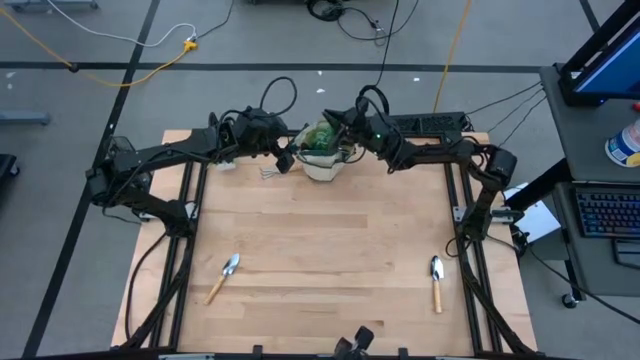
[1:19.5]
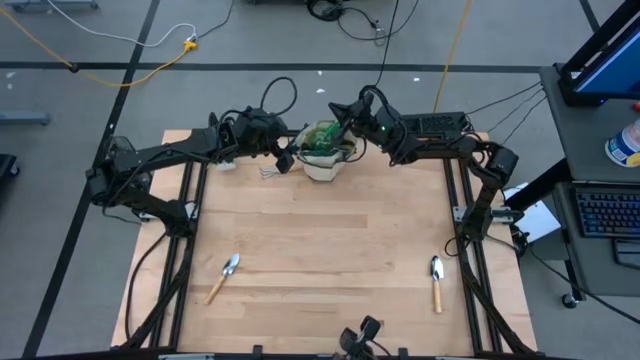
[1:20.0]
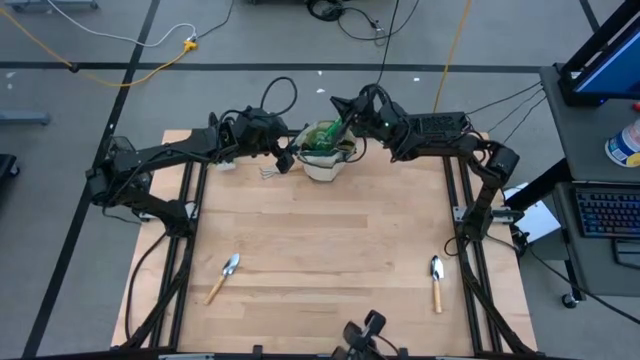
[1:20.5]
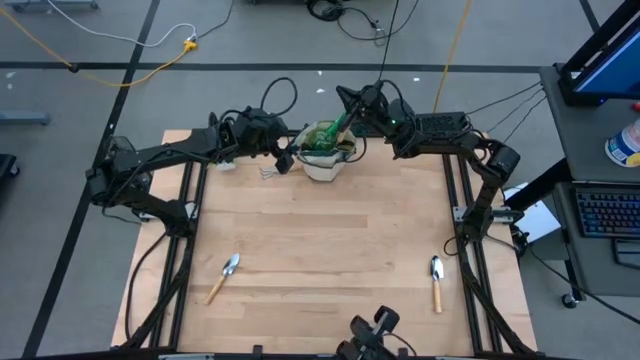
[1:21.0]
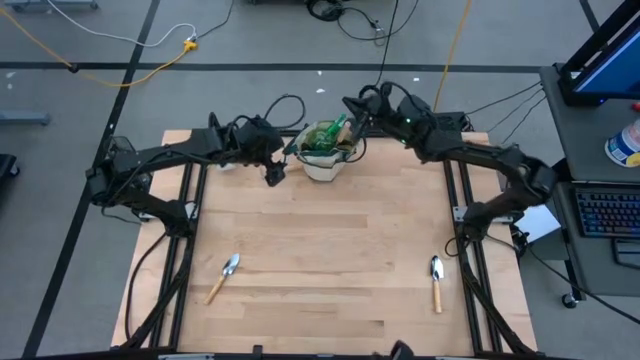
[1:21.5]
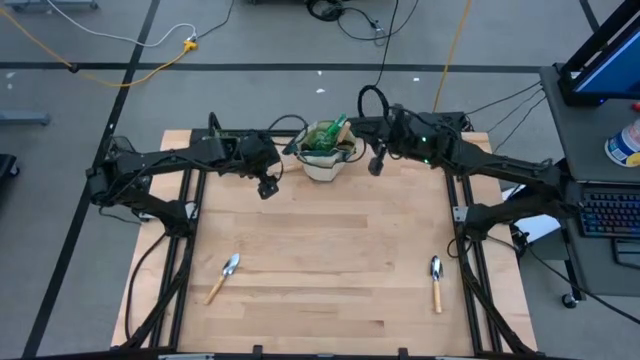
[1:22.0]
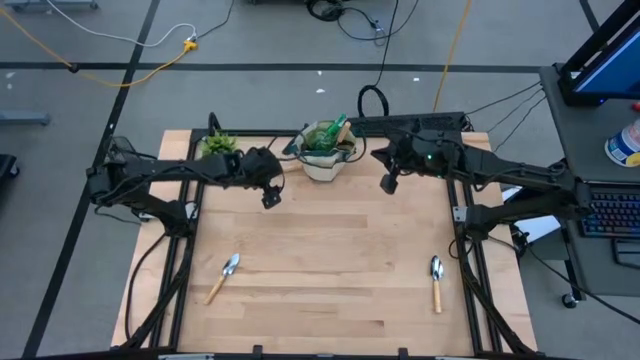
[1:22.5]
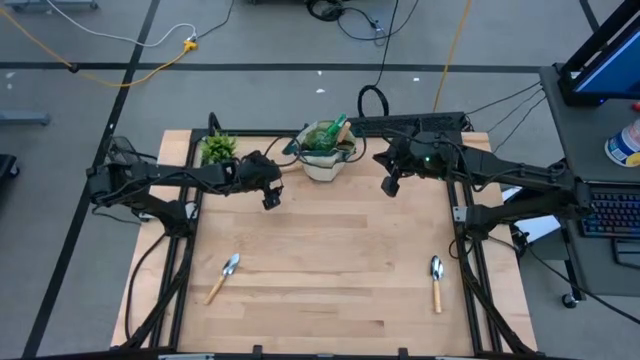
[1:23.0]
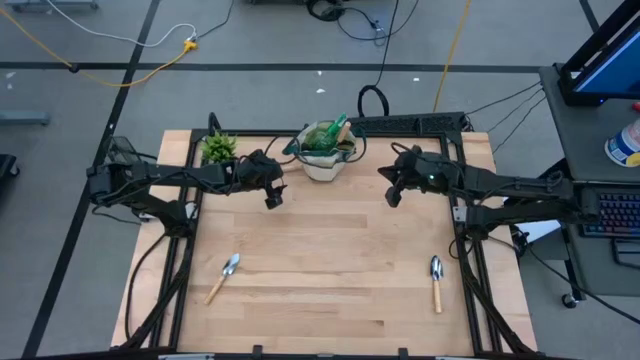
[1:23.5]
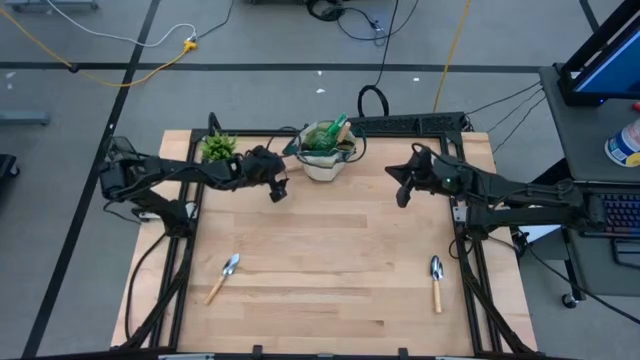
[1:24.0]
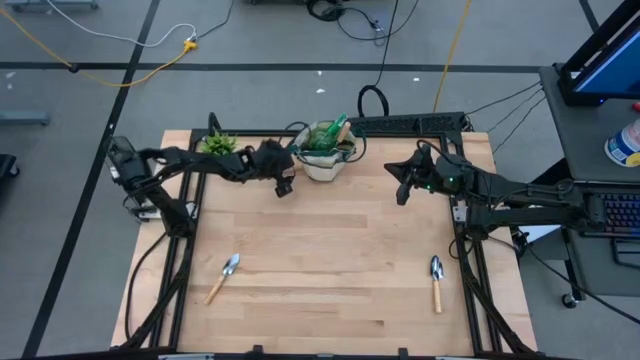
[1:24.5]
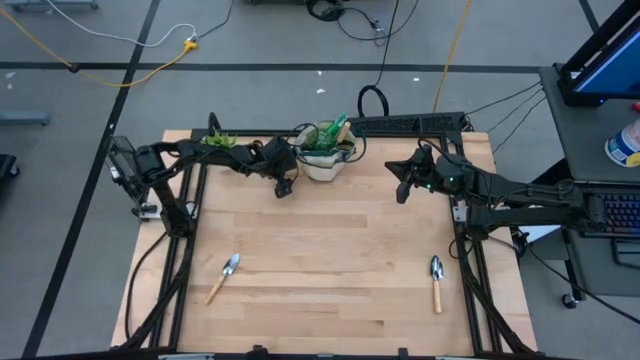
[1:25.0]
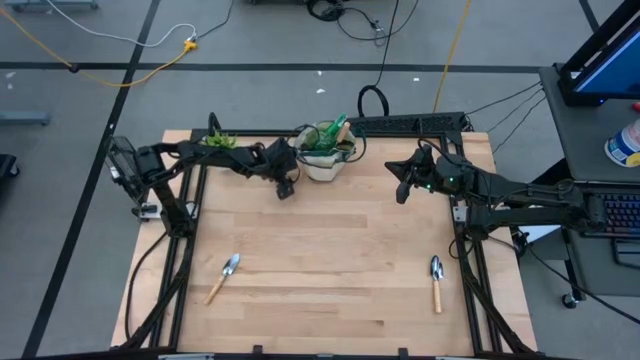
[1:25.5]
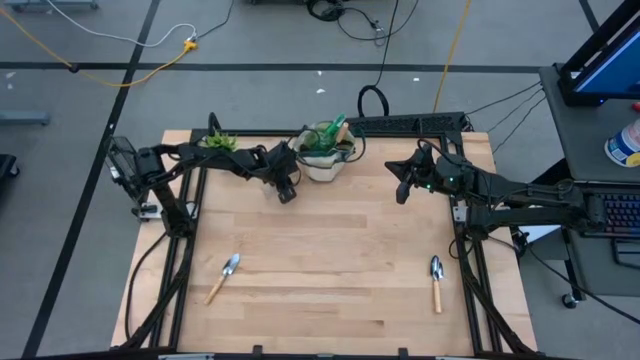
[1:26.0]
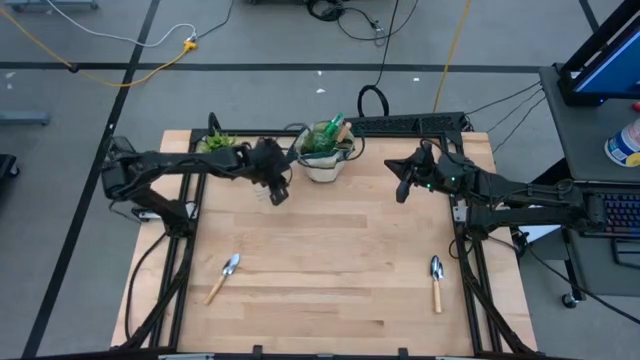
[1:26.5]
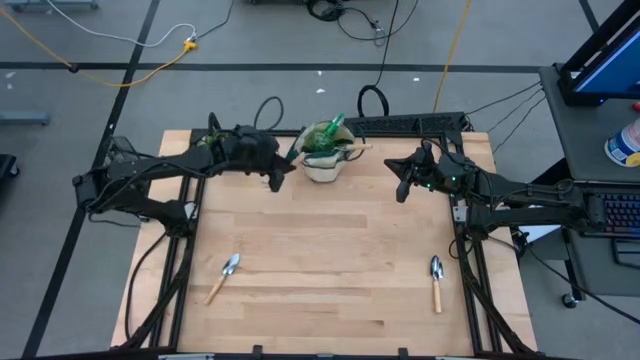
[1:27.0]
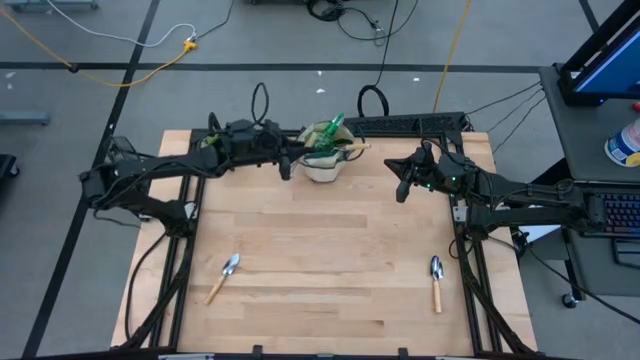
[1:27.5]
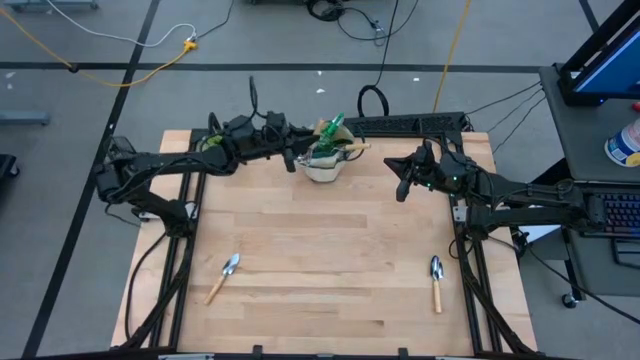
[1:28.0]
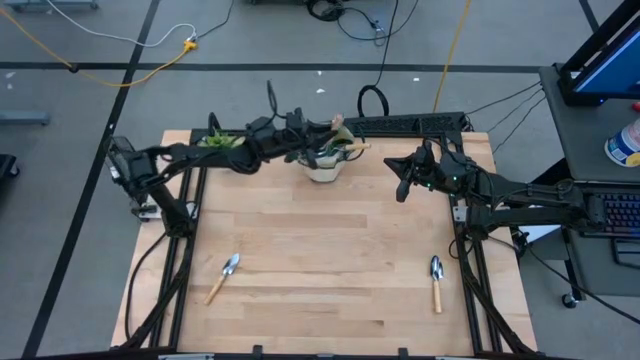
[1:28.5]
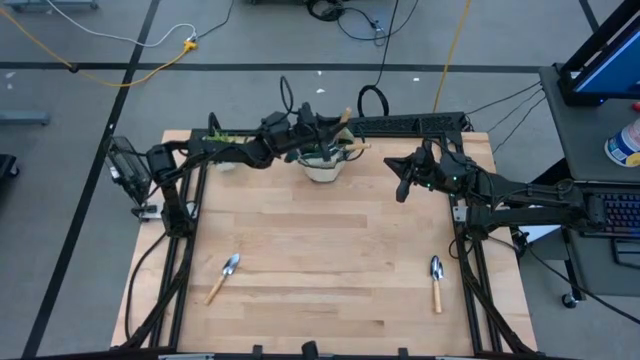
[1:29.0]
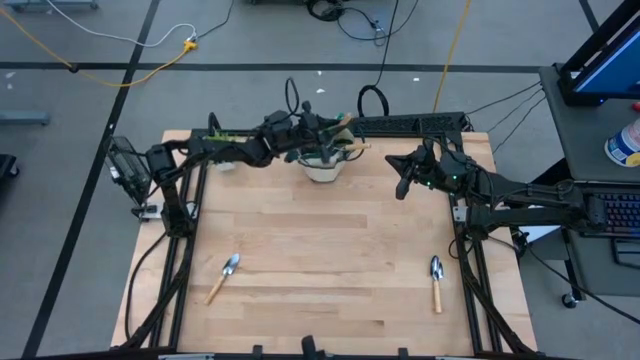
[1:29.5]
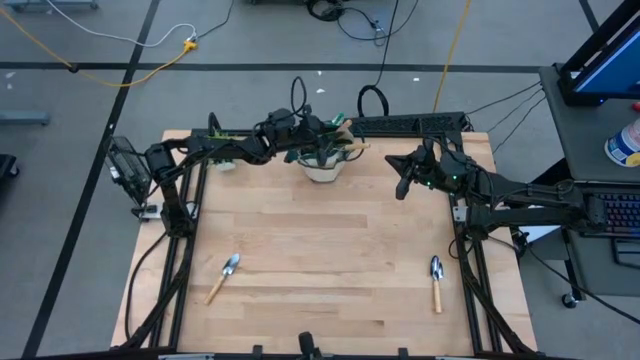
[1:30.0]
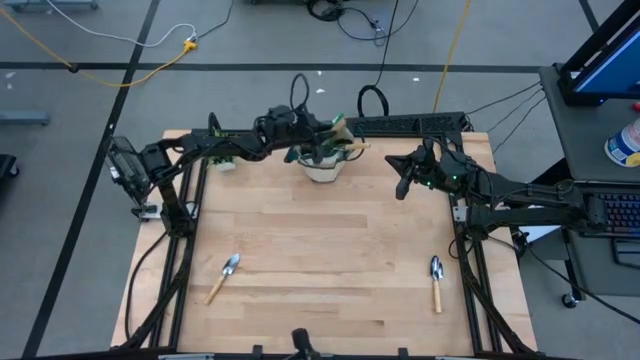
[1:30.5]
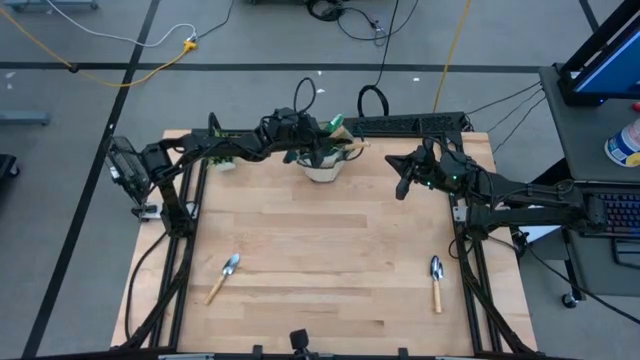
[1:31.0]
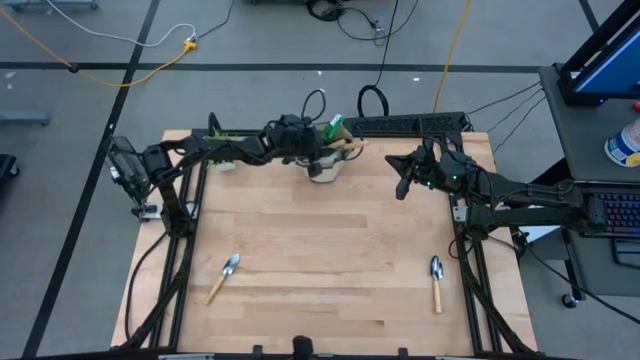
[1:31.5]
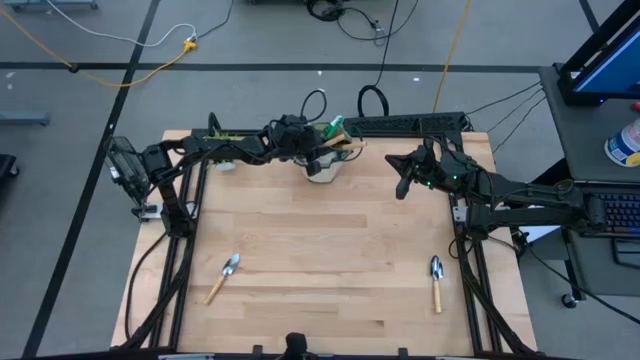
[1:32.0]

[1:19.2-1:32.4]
Task: Pick & Place Garden tools in Gardening bag
Put the brown hand rake into the green gardening bag

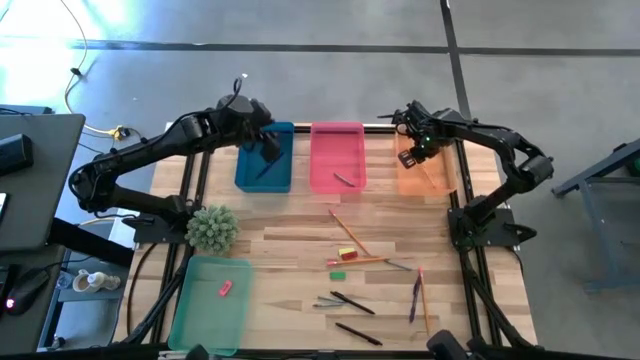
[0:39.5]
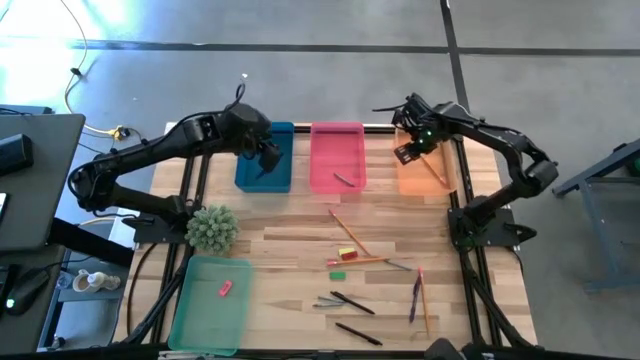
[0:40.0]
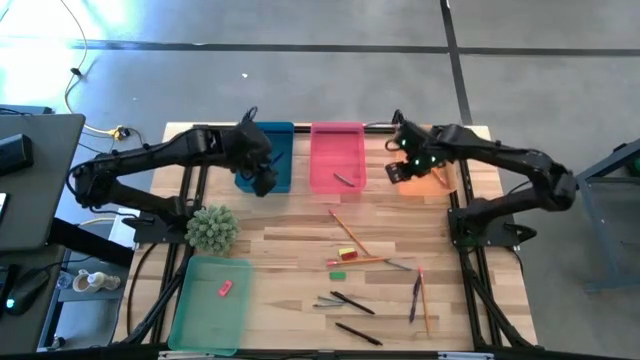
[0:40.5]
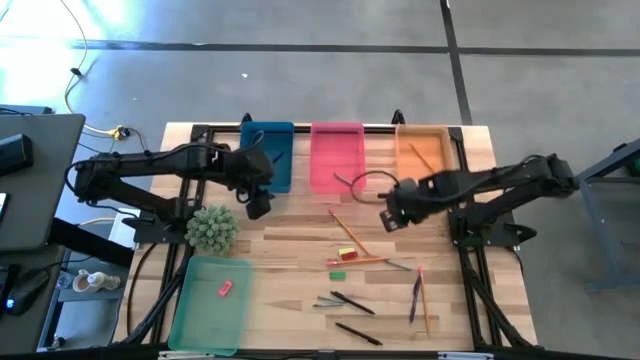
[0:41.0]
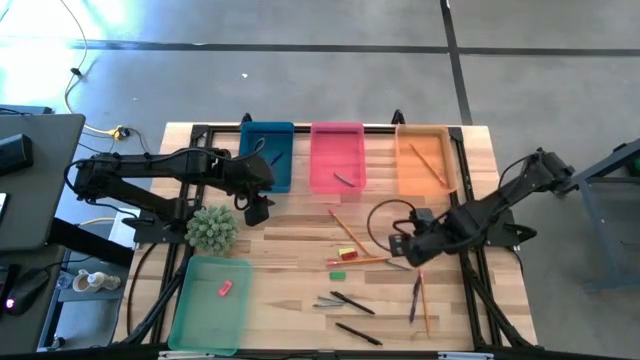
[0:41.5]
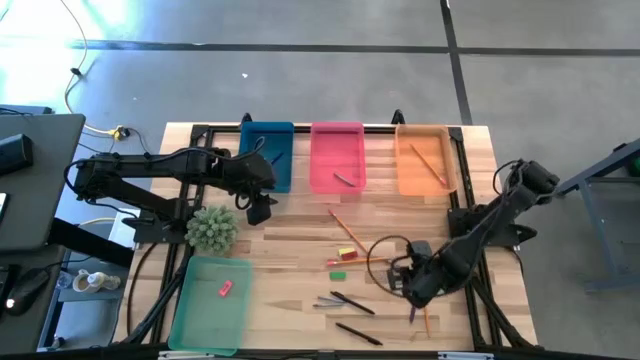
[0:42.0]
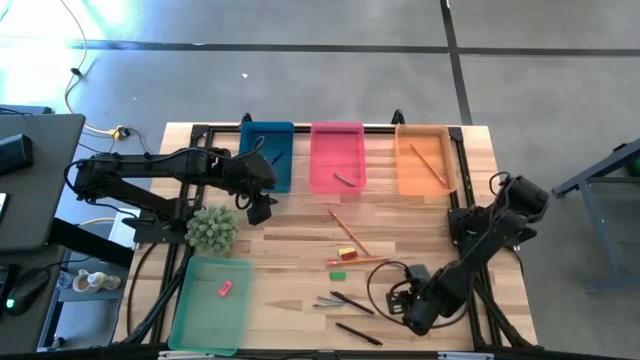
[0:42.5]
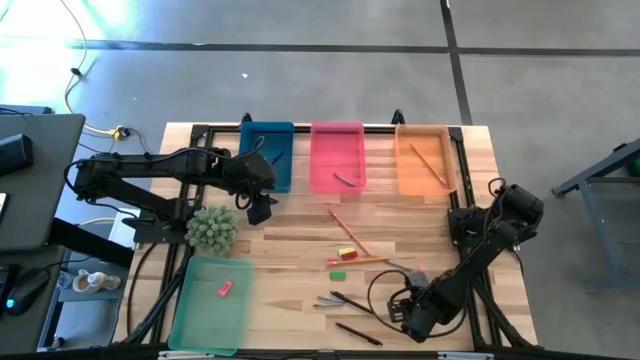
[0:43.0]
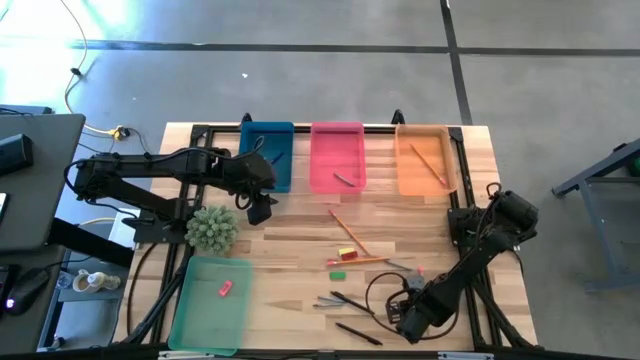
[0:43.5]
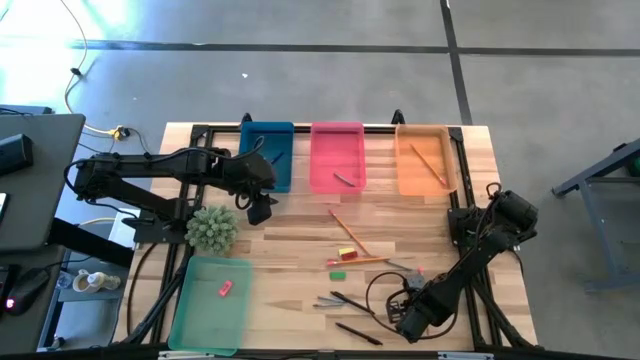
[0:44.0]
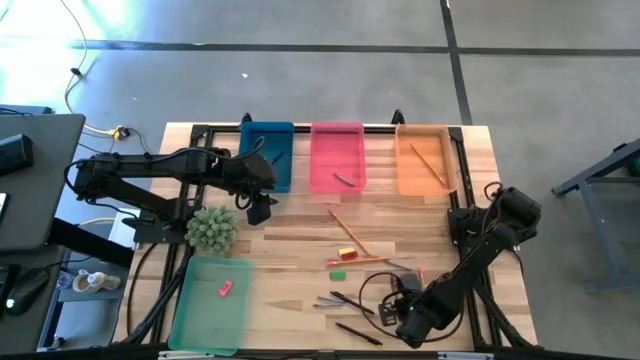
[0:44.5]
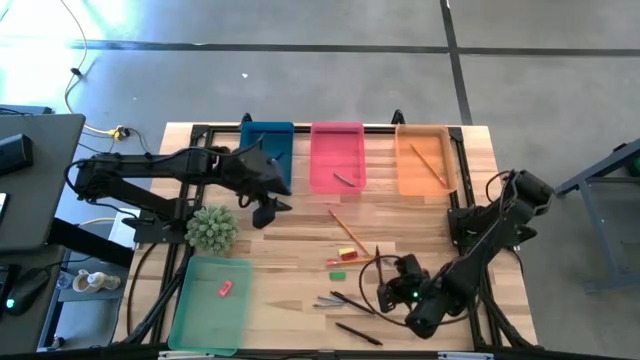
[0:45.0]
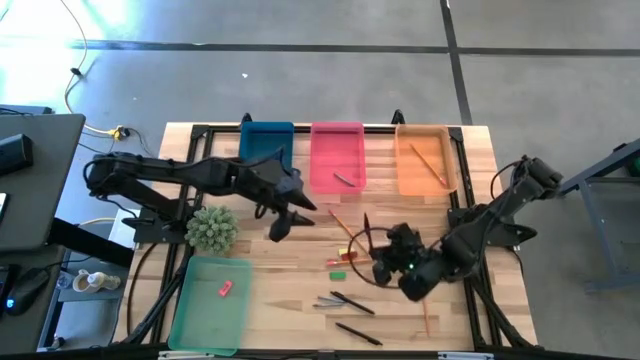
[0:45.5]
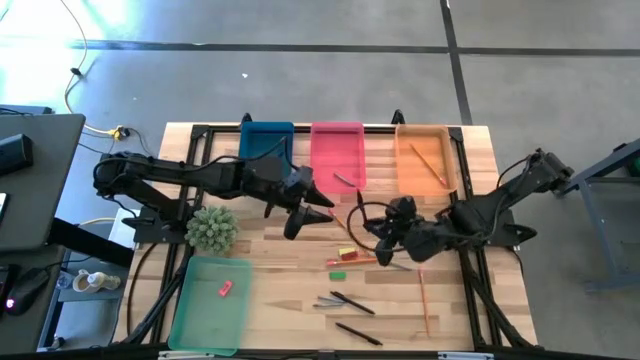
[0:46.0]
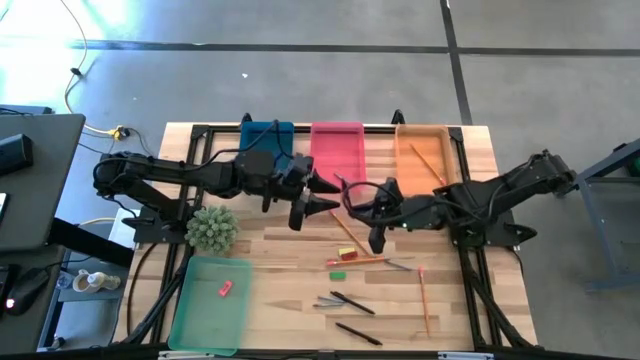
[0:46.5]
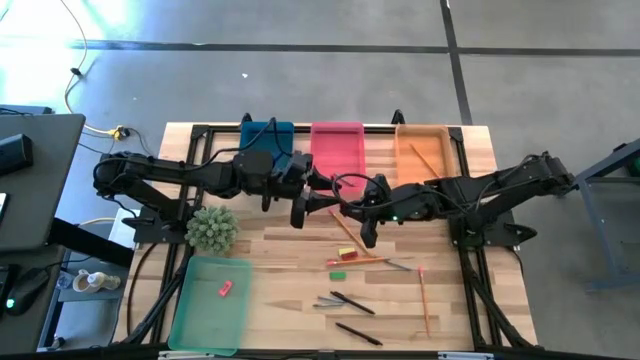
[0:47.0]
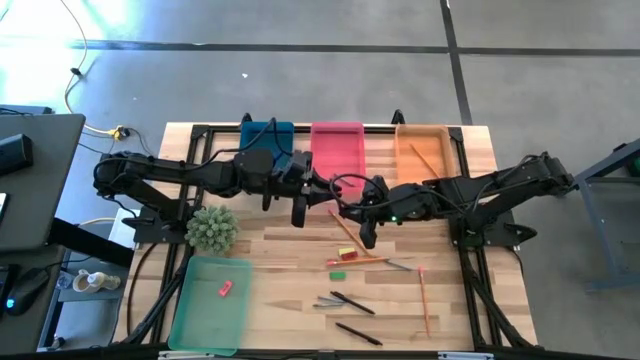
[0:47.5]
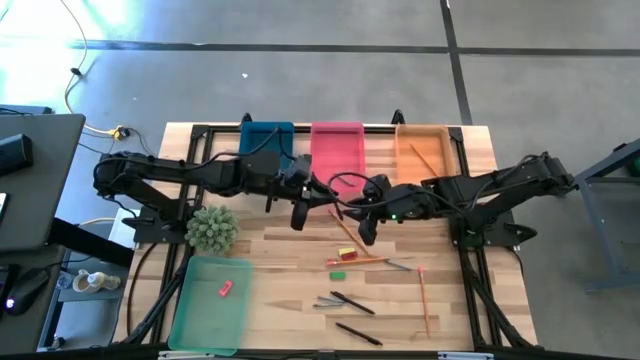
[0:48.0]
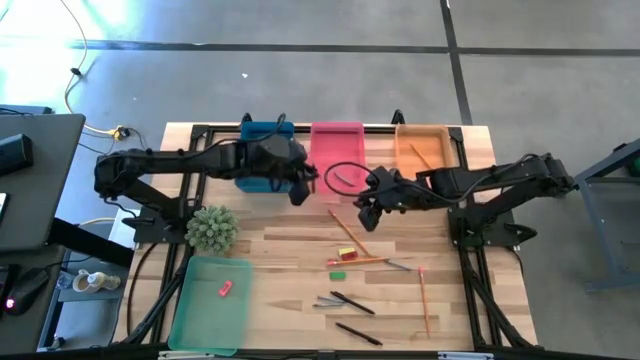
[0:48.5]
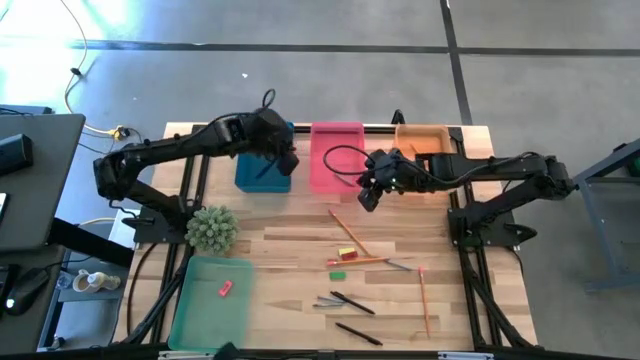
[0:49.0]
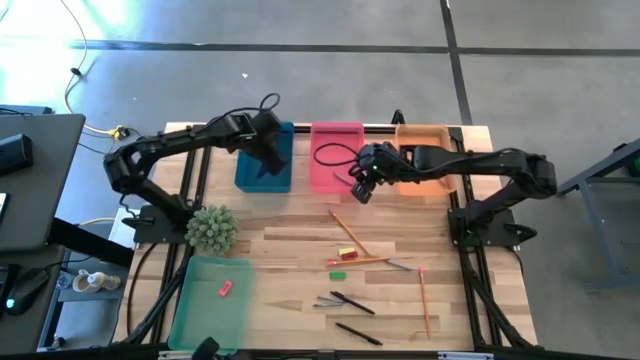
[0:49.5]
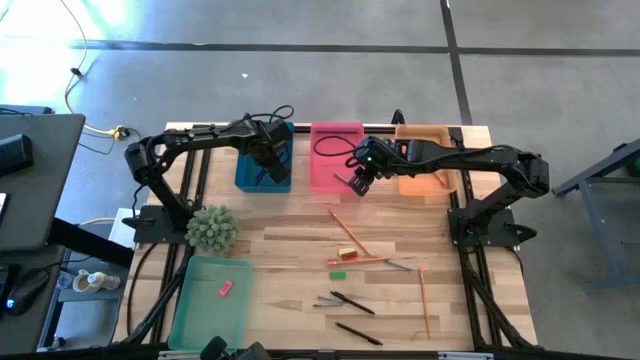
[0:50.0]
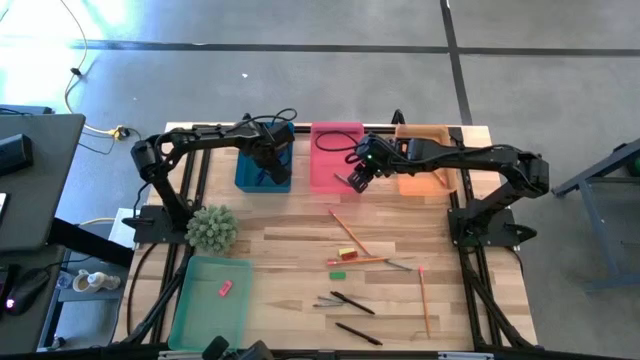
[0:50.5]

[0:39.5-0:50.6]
Task: Sort crayons/erasers/pens/pencils in bins
Put the violet pen into the blue bin
